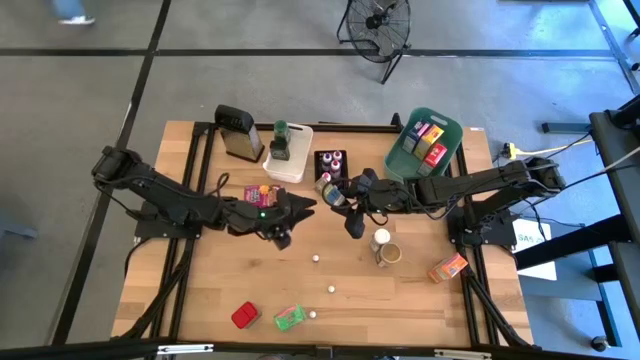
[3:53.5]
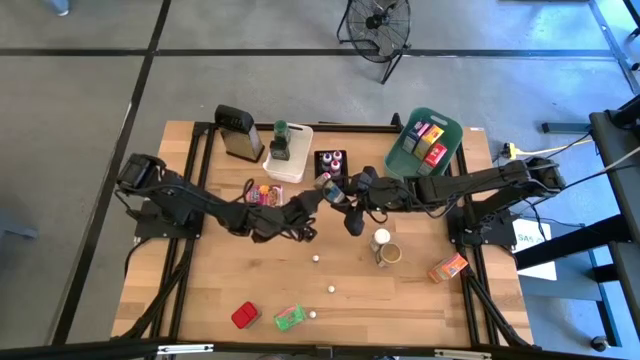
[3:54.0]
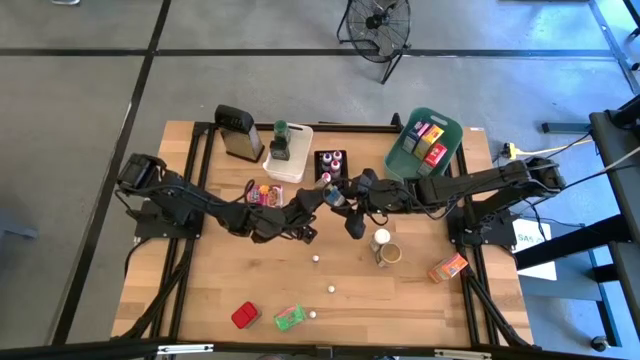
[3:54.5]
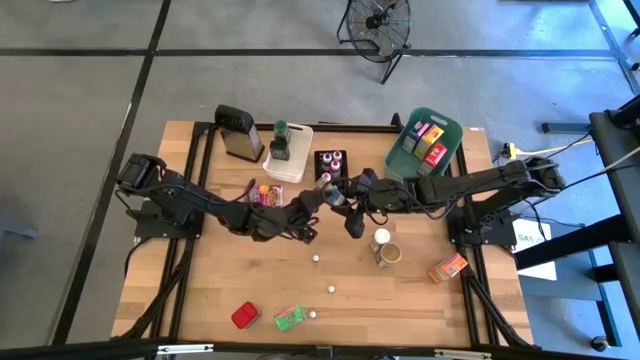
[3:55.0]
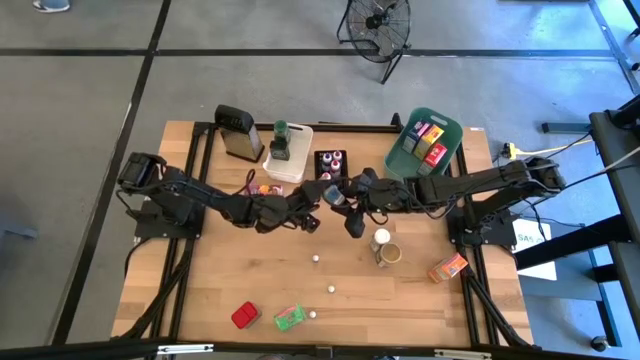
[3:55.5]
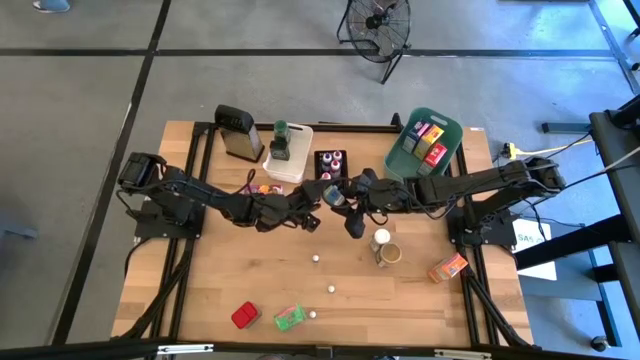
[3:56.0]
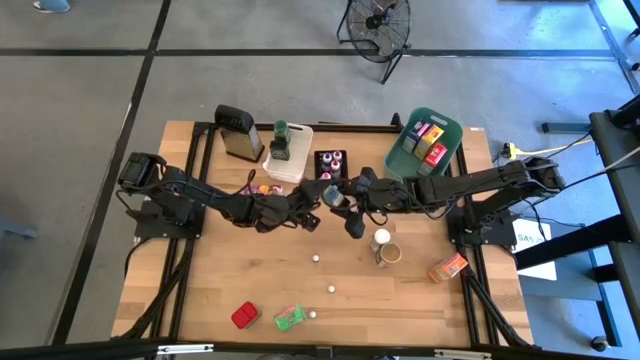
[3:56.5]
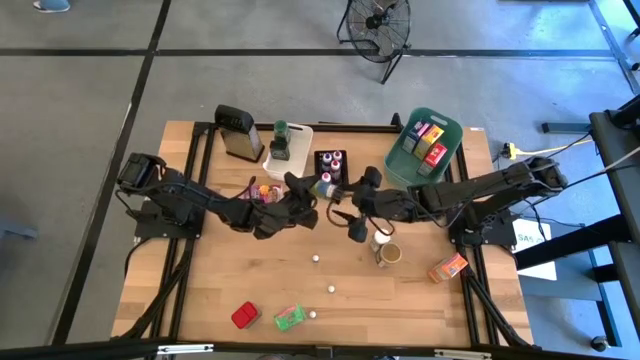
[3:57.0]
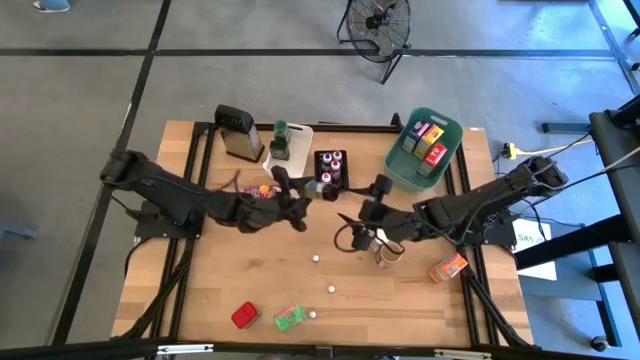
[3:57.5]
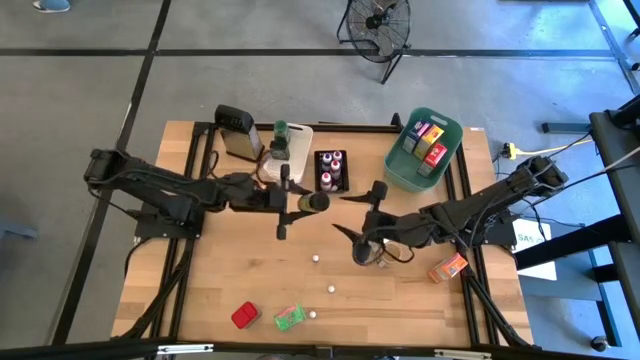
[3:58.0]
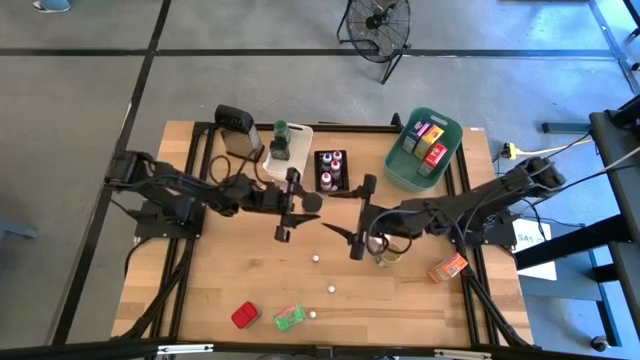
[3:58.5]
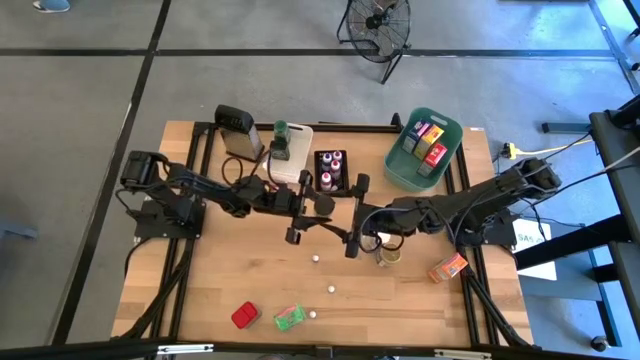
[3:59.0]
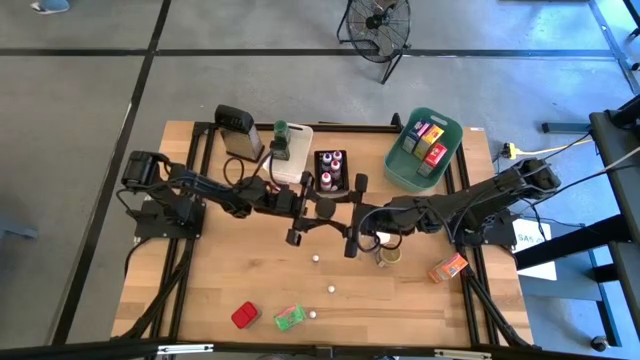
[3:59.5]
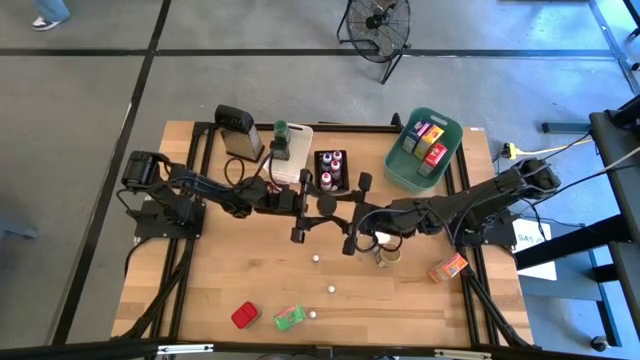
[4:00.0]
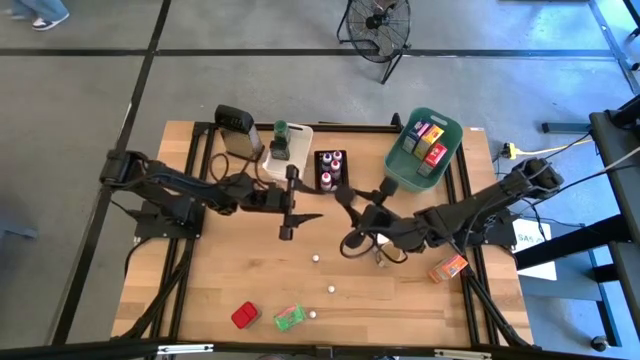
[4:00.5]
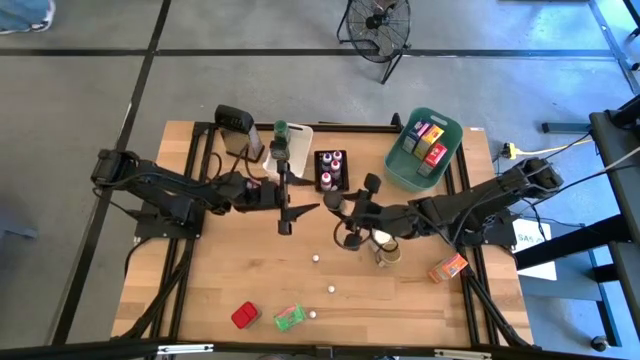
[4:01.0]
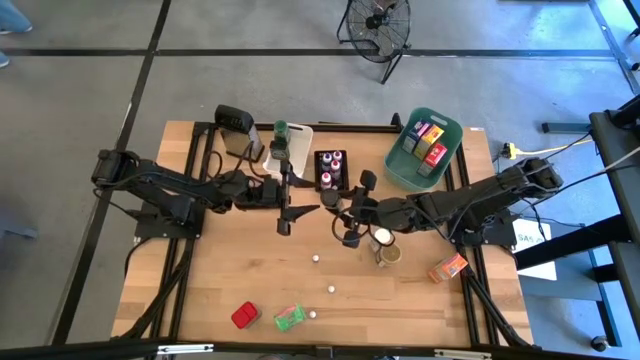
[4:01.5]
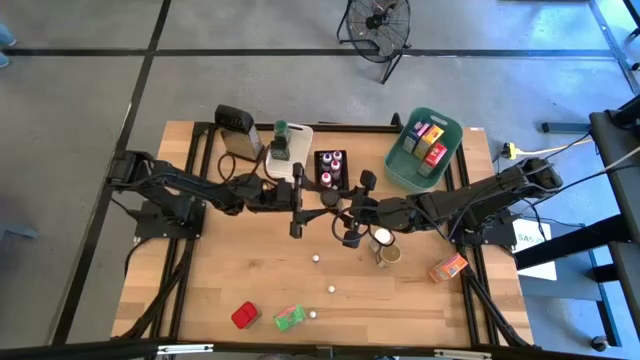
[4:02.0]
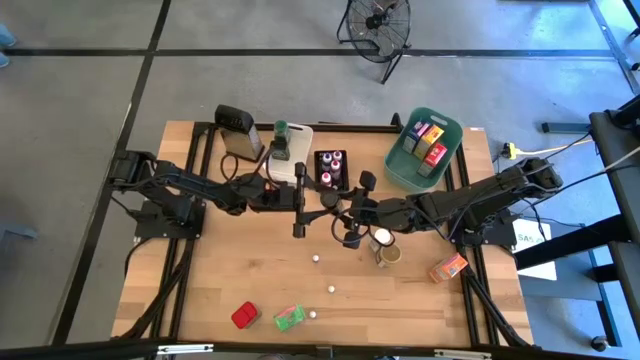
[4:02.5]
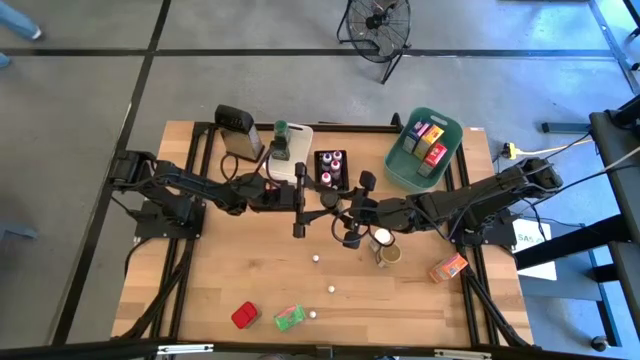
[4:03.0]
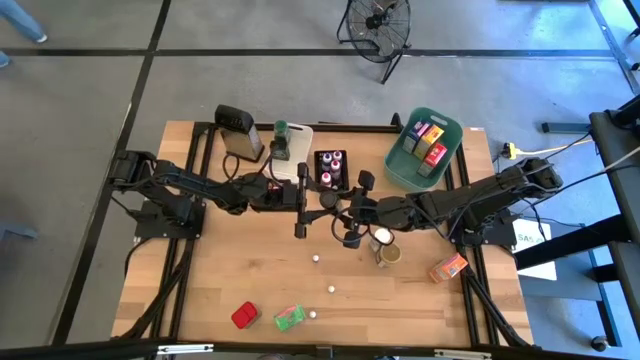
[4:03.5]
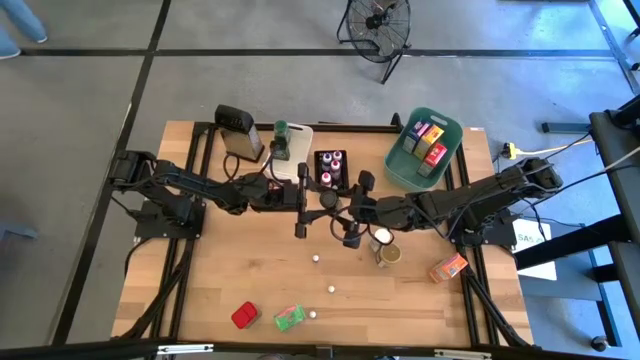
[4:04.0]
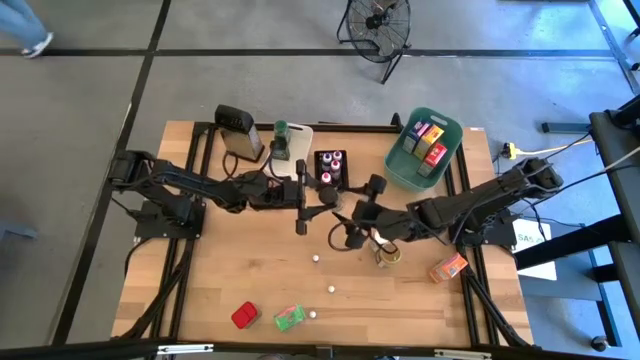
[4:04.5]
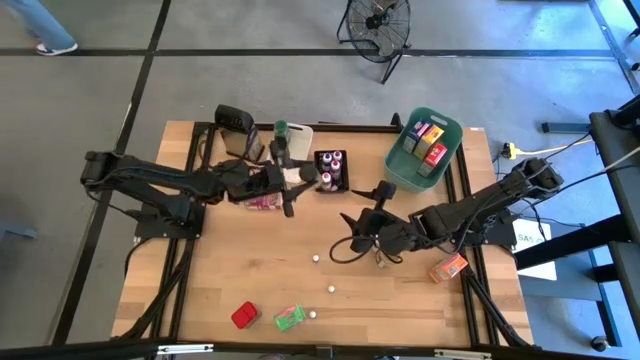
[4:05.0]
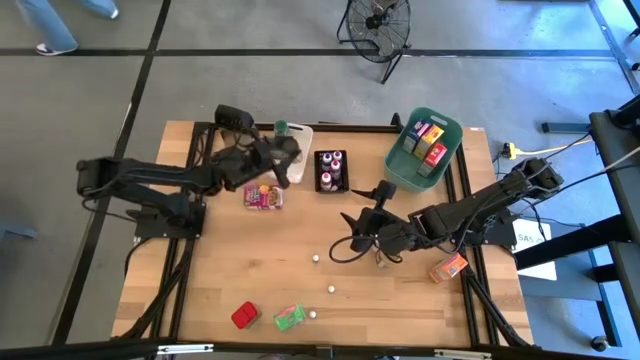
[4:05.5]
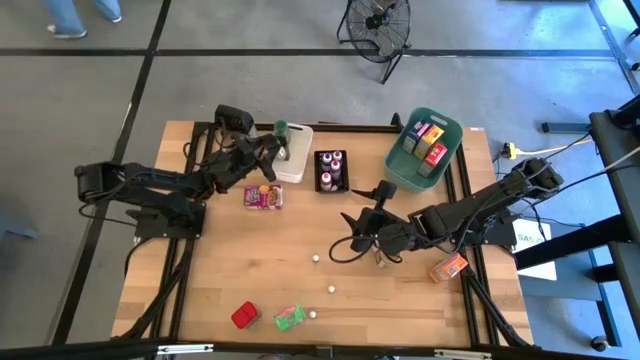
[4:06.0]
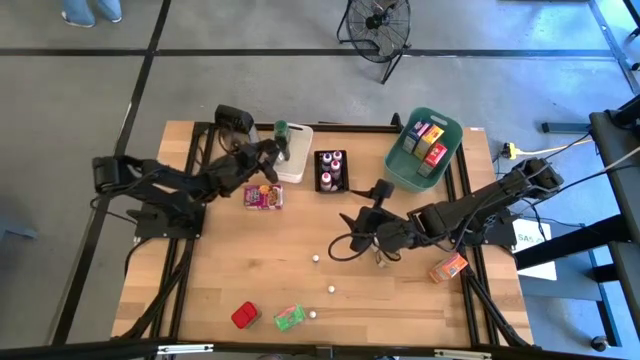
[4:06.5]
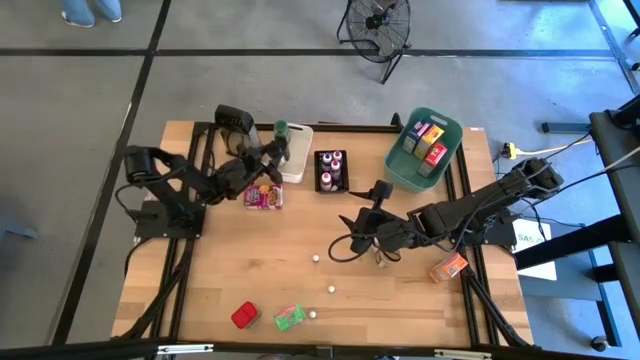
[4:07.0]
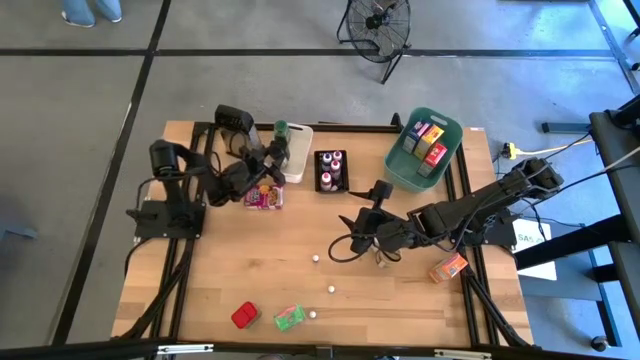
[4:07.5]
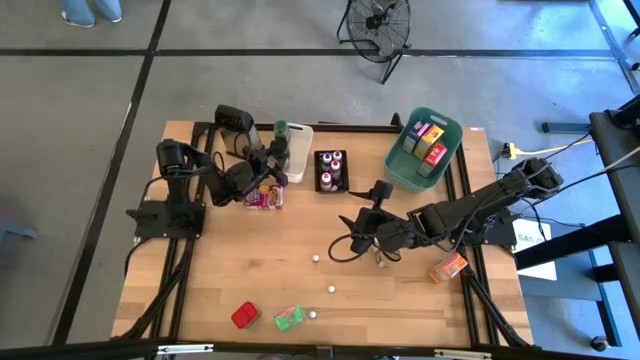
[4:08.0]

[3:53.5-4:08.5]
Task: Pick & Place Kitchen Items
Adjust the black seasoning bottle in the white bin

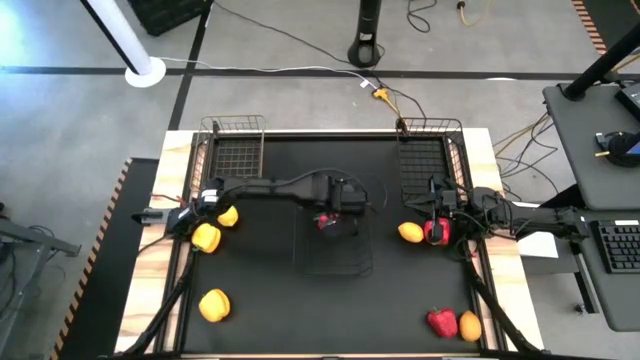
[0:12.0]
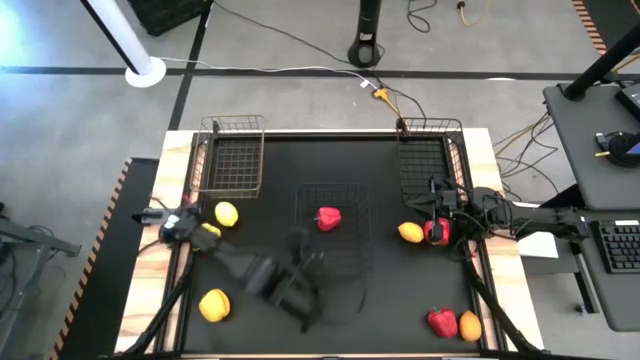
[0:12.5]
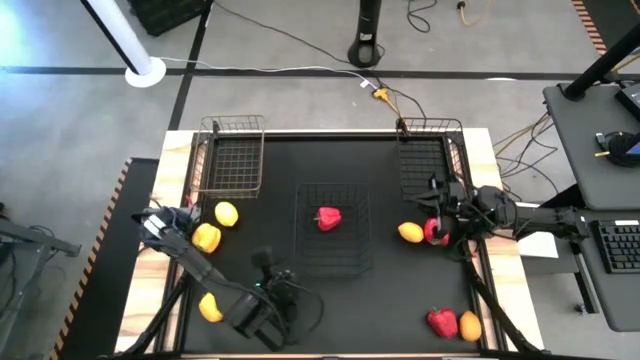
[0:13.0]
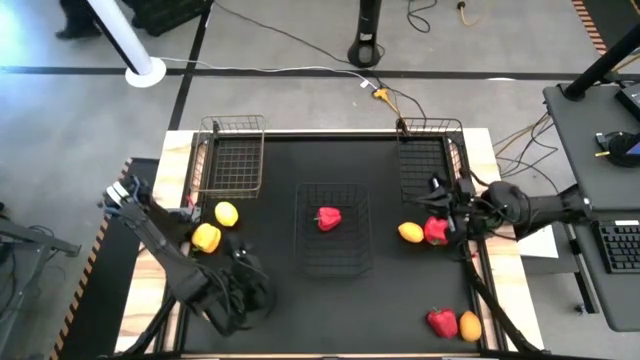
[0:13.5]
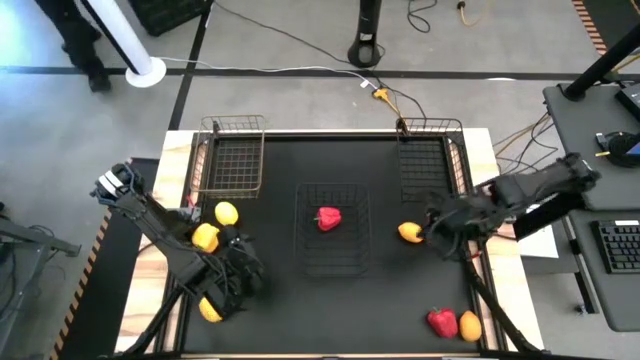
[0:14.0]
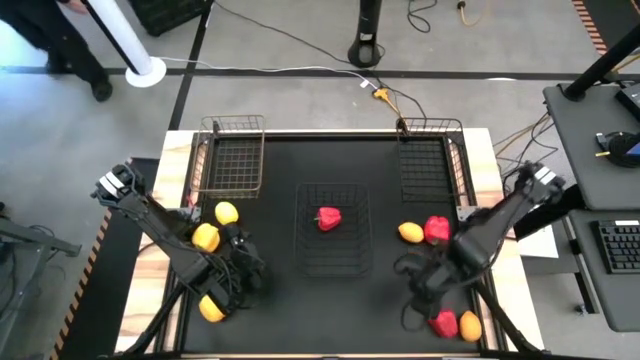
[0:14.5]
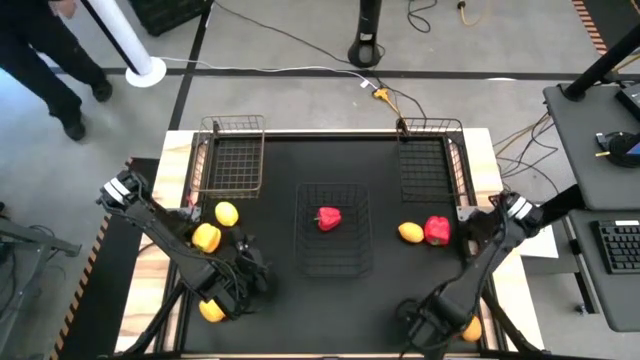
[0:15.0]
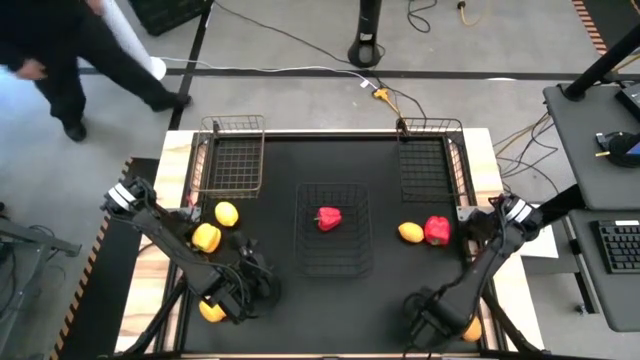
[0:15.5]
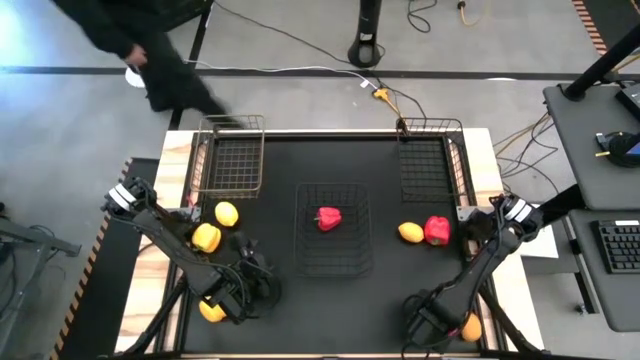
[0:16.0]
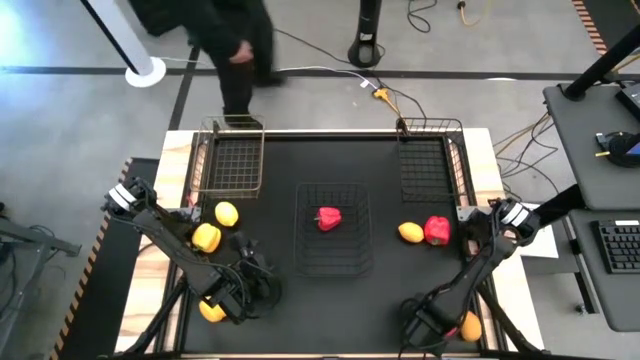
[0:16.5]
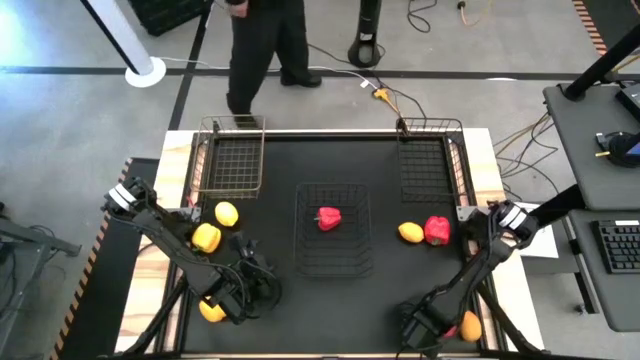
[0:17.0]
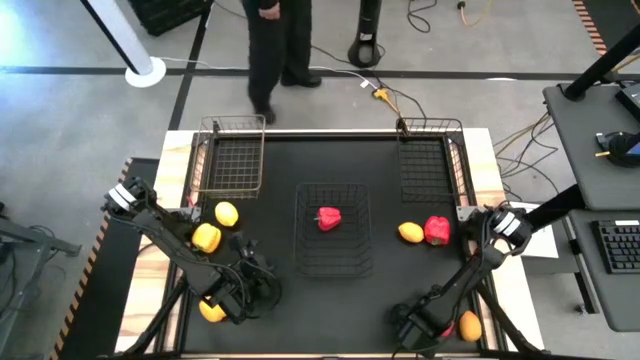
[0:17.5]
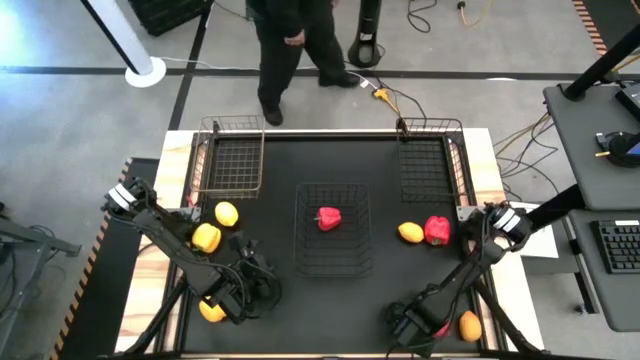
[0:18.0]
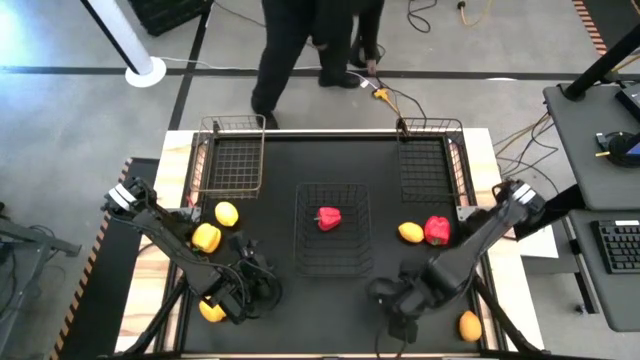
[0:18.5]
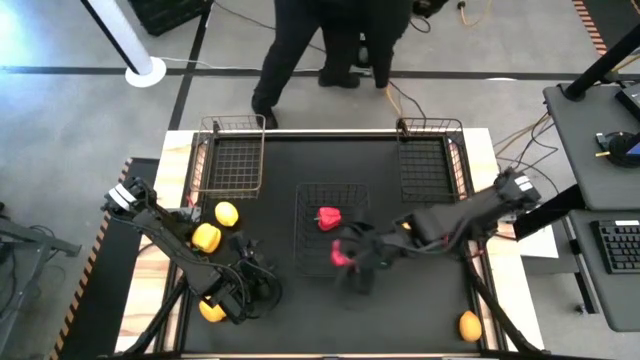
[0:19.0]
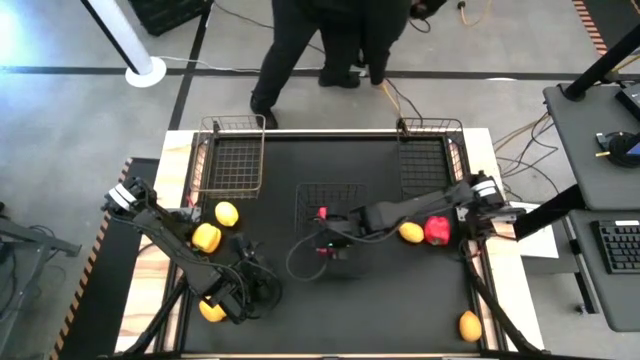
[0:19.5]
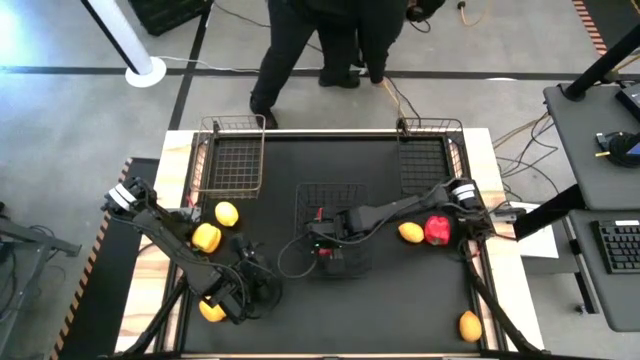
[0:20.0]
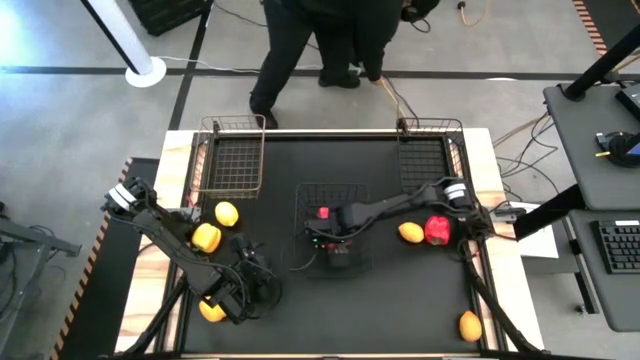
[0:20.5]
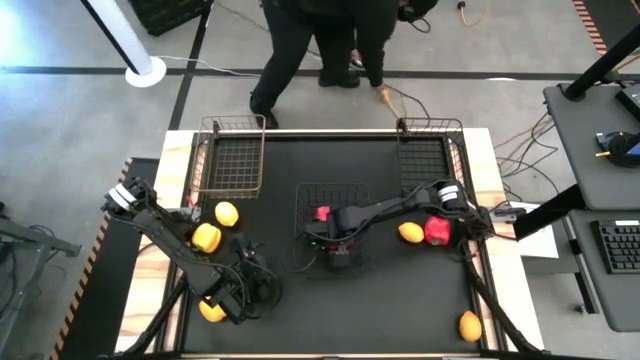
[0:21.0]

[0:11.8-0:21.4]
Task: Sort produce into baskets
Put the bottom red bell pepper into the bottom wire basket
